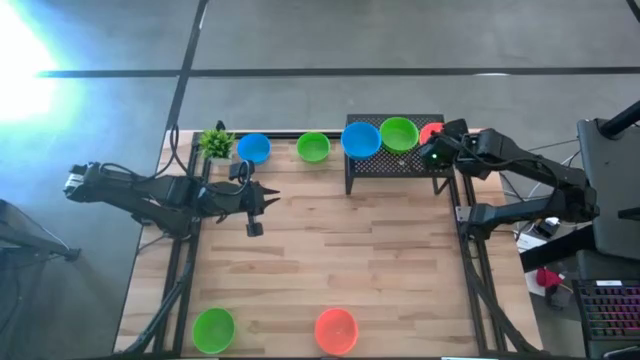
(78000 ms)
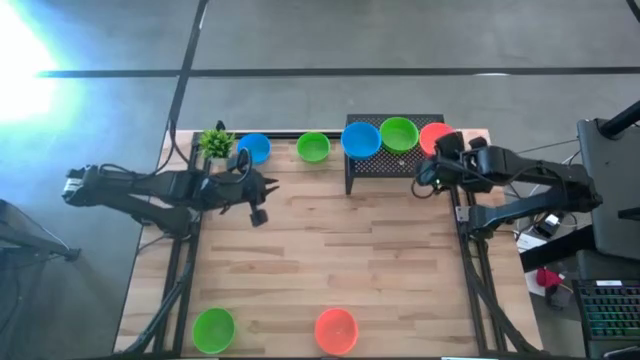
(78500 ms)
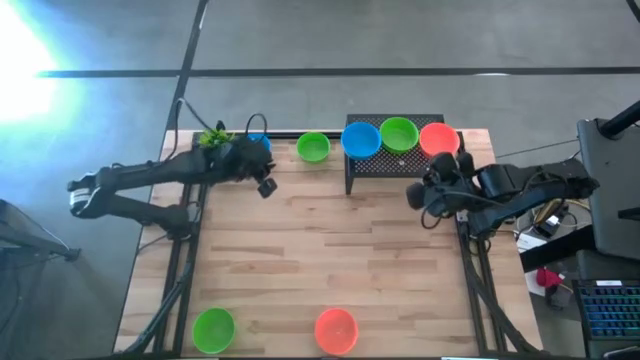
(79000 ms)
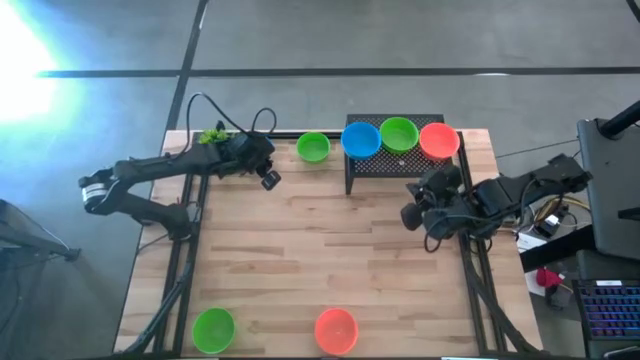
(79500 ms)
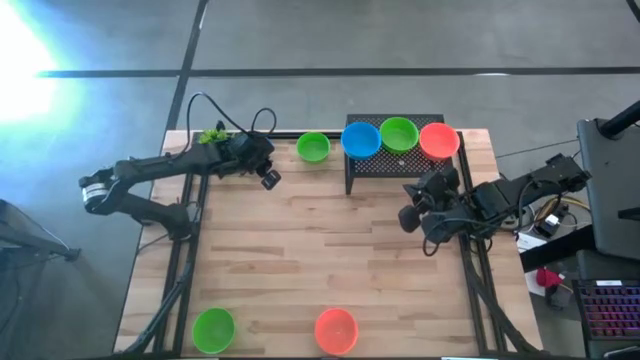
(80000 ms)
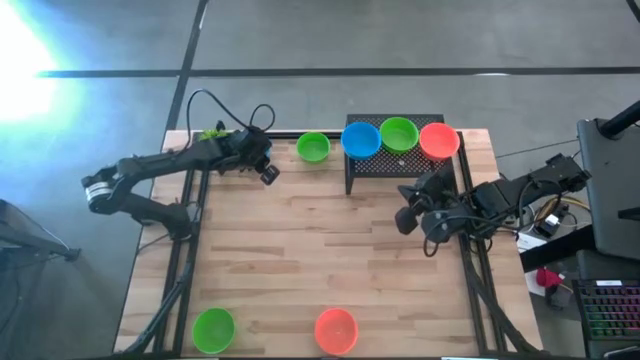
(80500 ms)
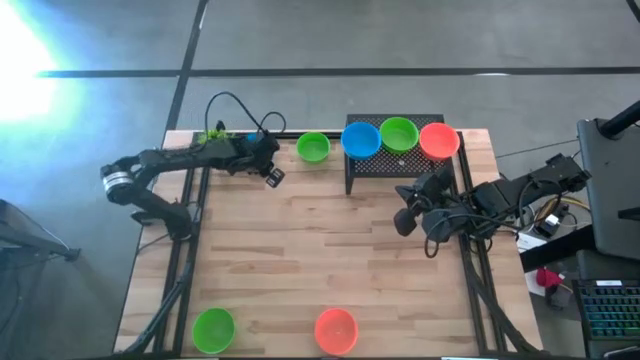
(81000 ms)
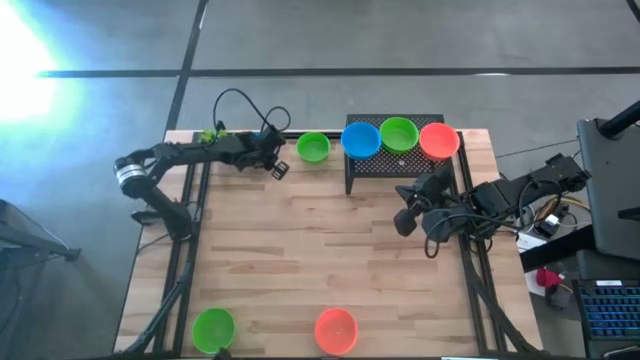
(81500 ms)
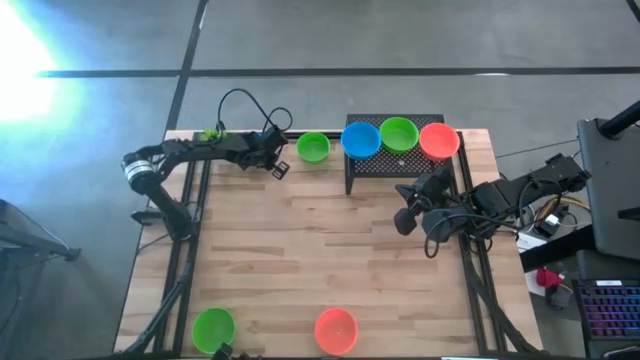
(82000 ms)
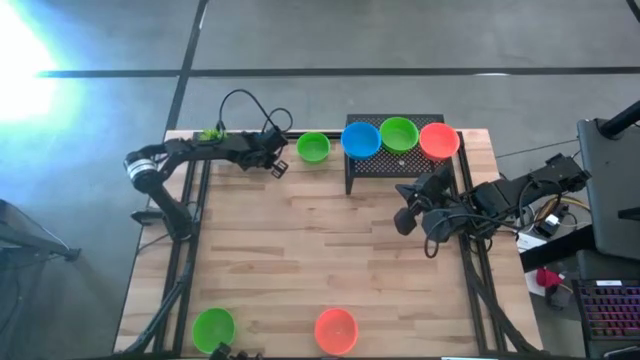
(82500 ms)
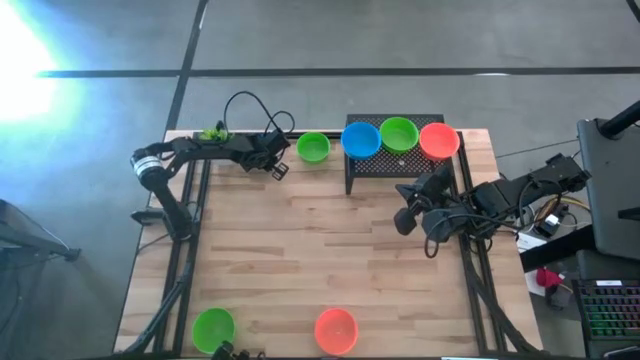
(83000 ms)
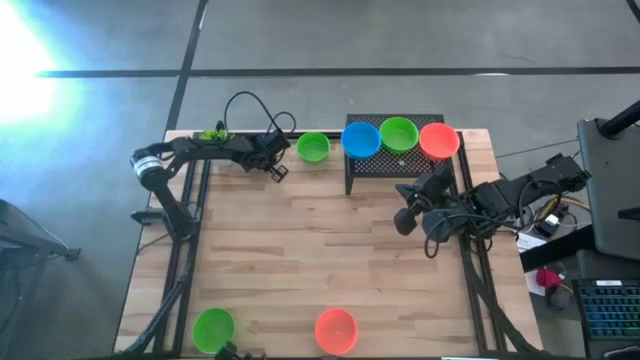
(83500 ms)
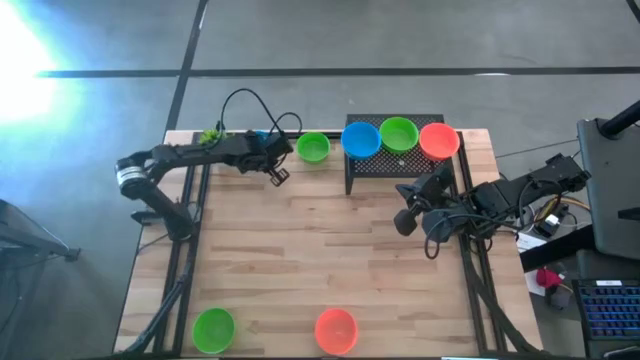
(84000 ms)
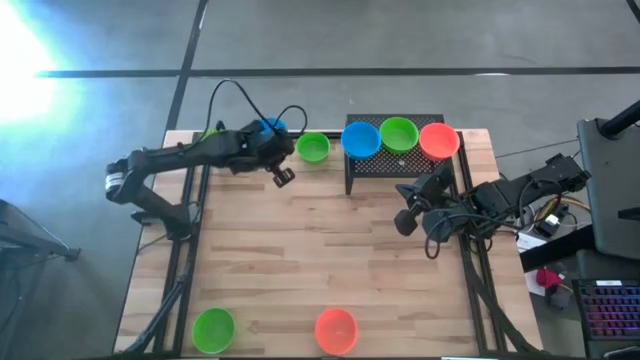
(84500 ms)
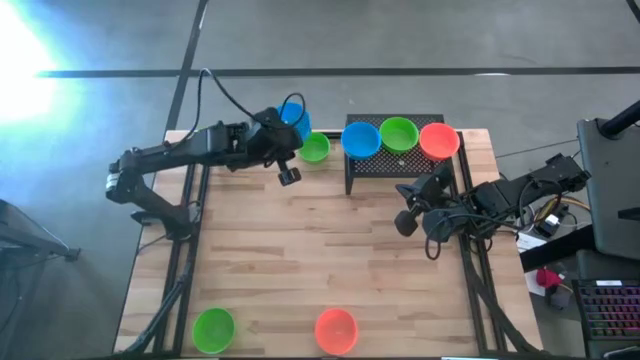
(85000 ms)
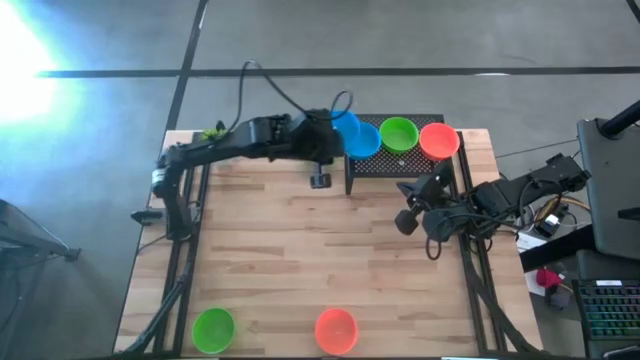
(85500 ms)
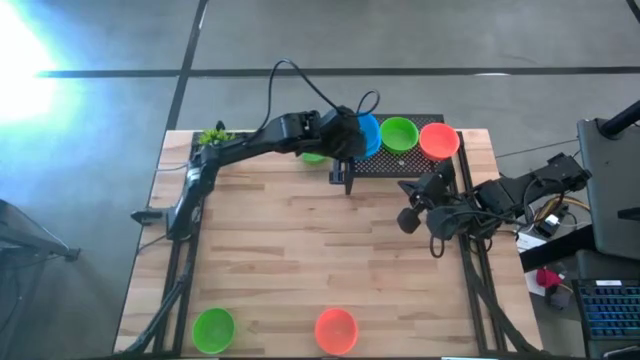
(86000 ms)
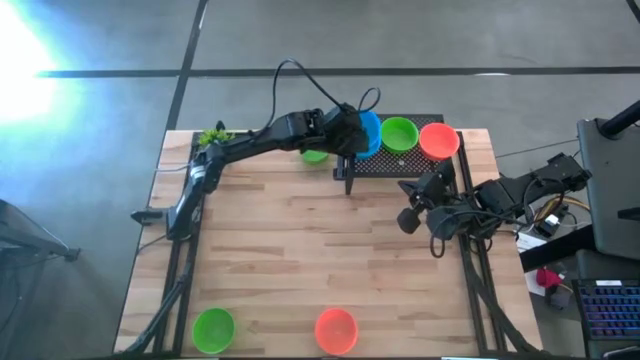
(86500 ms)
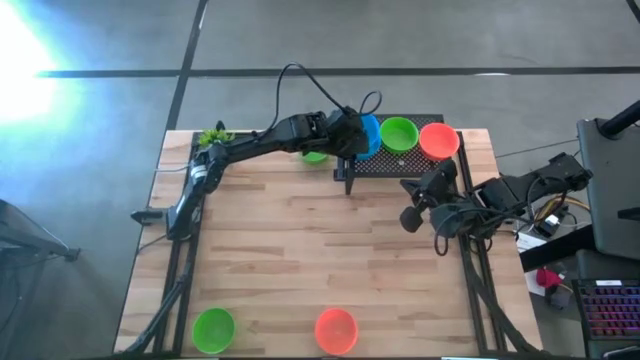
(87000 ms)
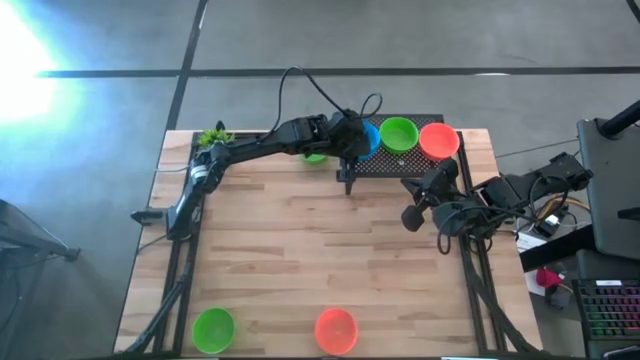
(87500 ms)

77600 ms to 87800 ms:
Task: Pick & Place Mini bowls
Stack the blue bowl on the blue bowl on the shelf

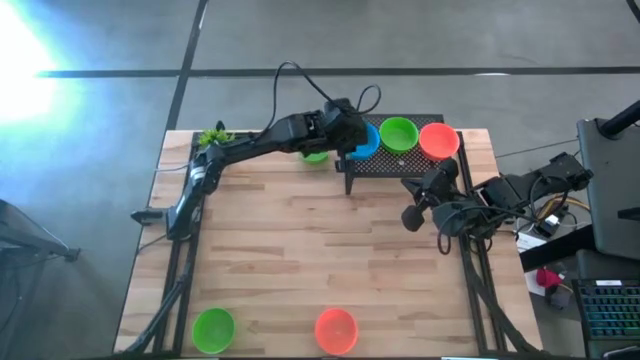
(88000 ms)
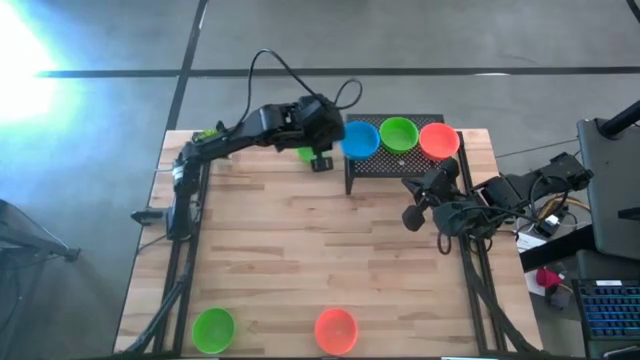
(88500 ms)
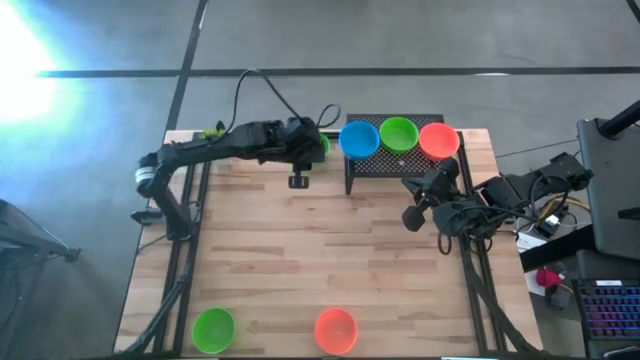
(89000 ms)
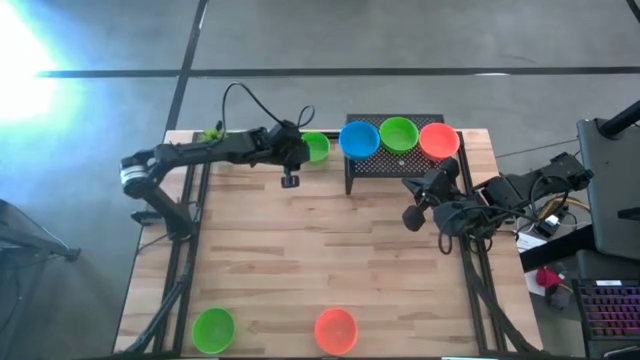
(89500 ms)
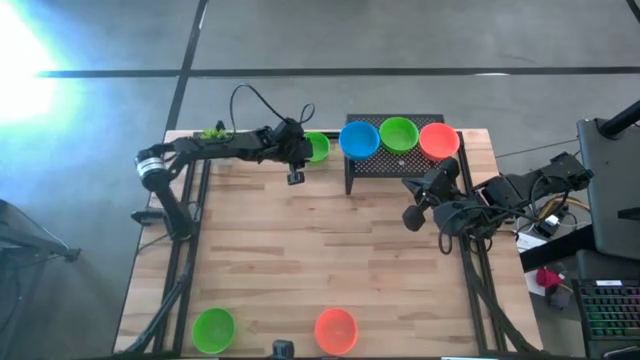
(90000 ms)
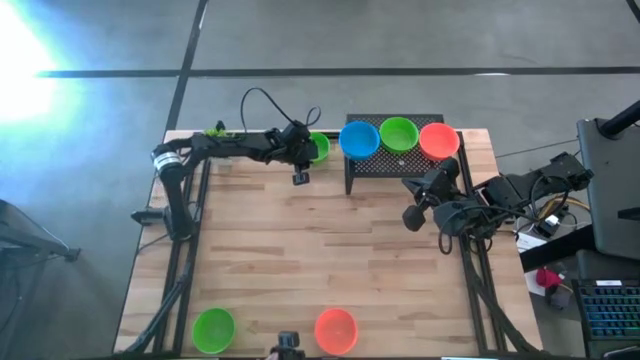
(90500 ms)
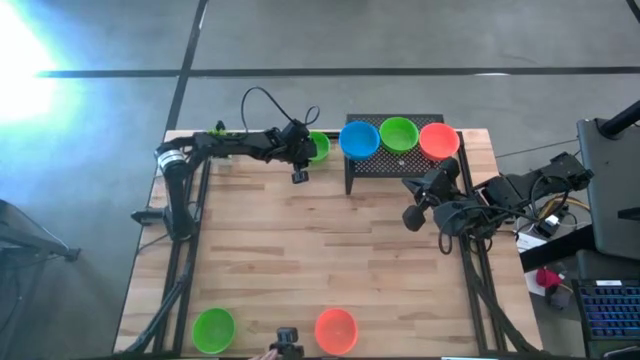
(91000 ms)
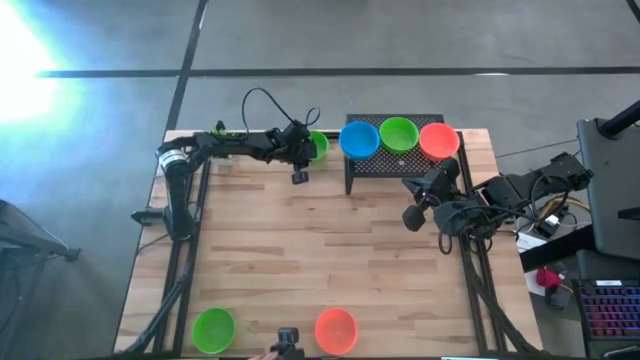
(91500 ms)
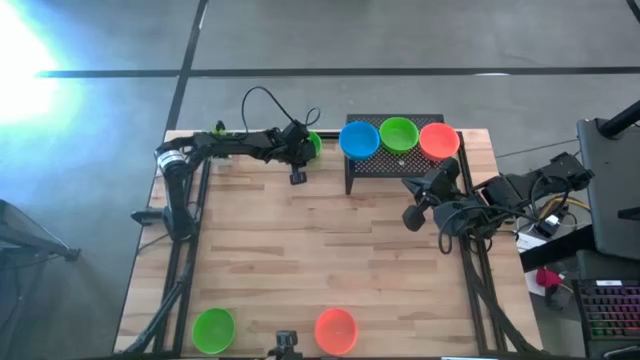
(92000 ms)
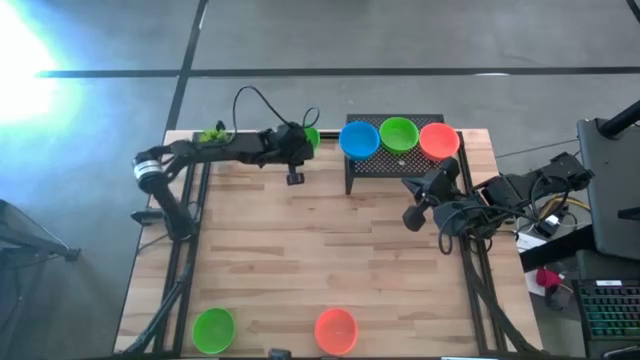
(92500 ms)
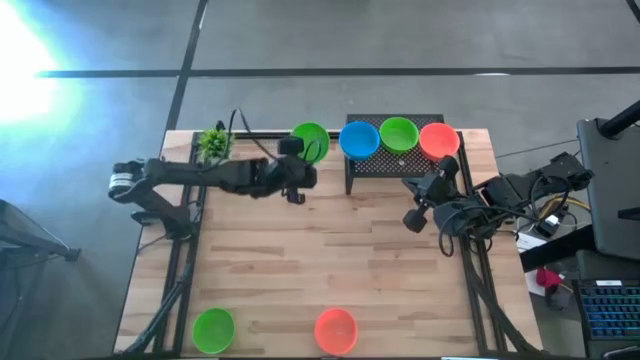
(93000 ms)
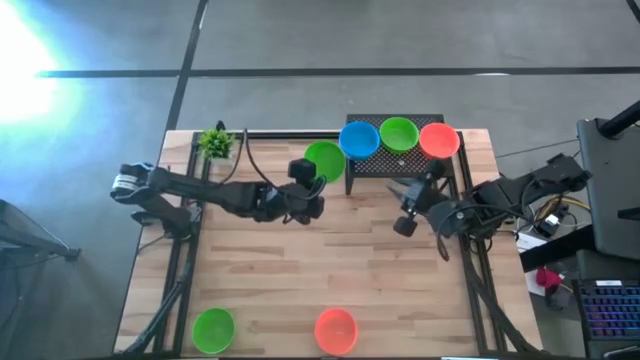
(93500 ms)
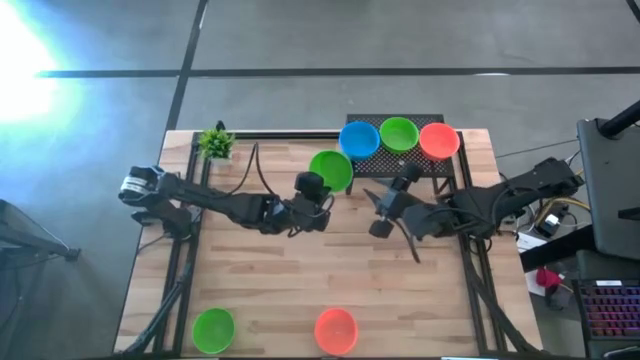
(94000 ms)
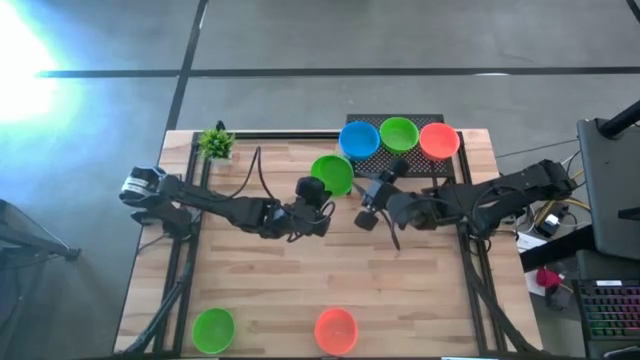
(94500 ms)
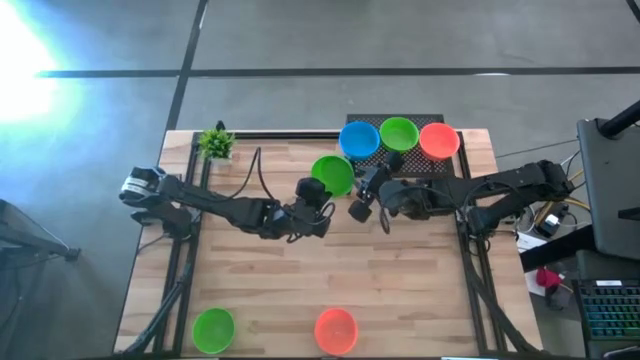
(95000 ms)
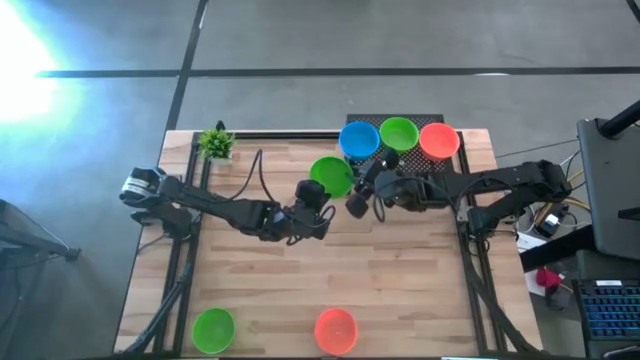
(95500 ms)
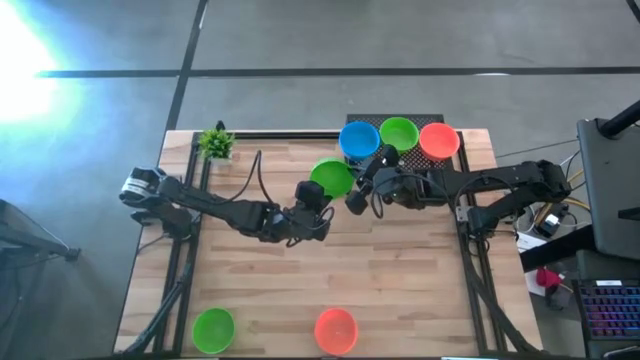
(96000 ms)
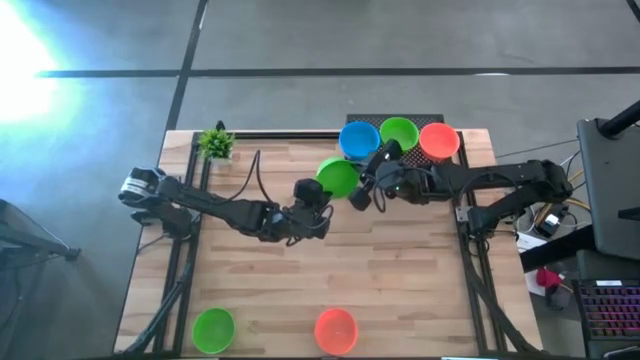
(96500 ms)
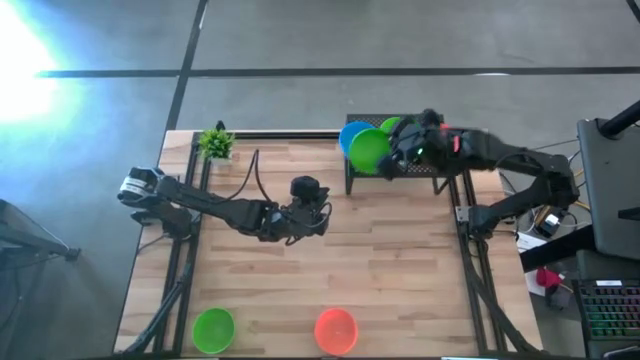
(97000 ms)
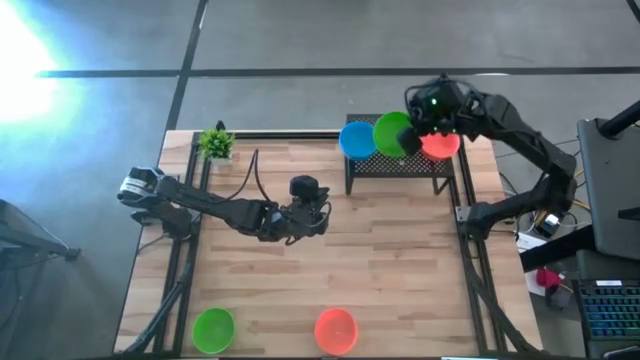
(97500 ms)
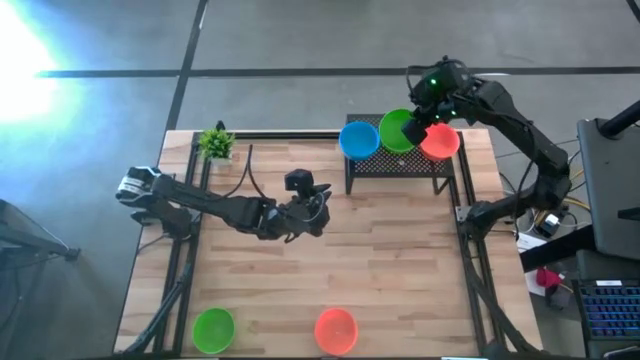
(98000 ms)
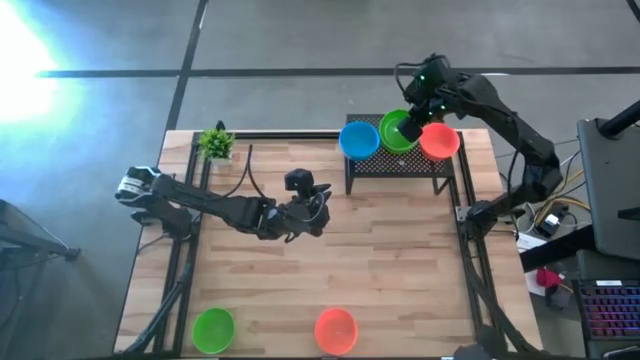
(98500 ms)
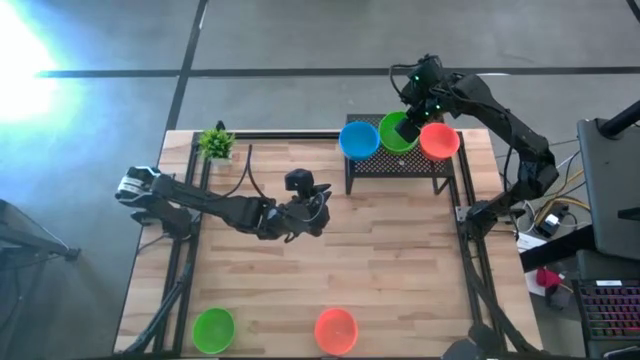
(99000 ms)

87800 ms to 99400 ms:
Stack the top green bowl on the green bowl on the shelf
